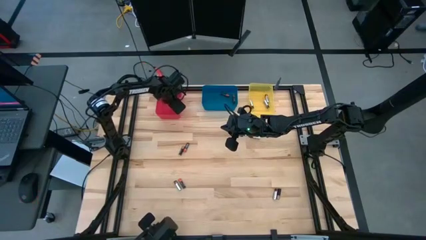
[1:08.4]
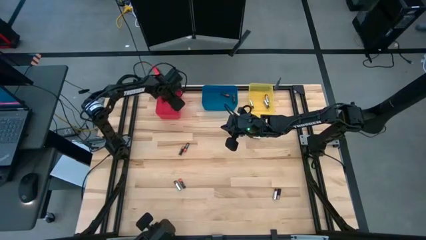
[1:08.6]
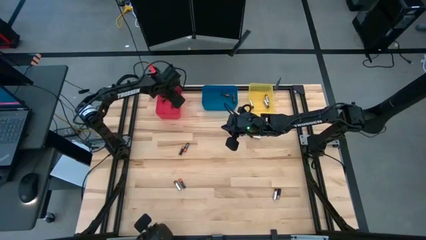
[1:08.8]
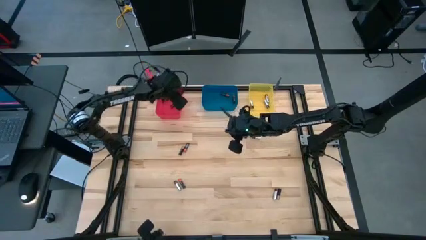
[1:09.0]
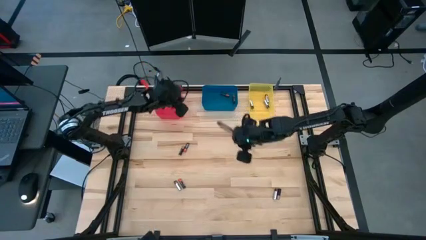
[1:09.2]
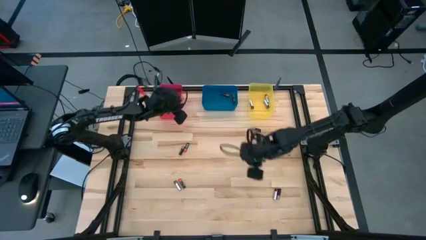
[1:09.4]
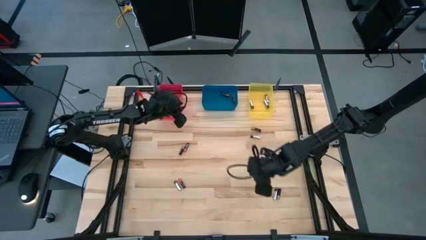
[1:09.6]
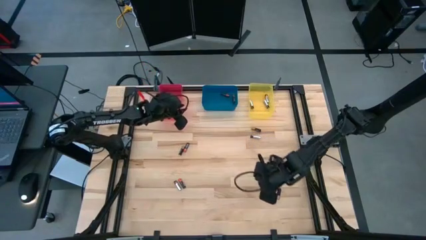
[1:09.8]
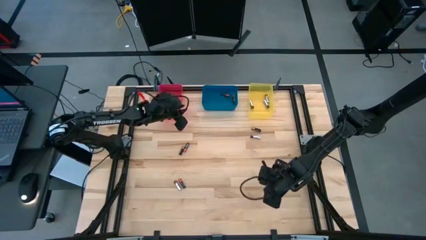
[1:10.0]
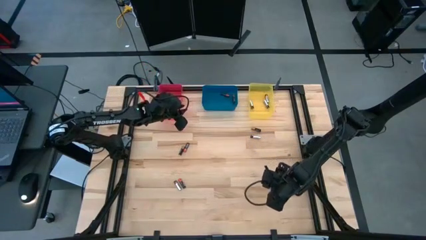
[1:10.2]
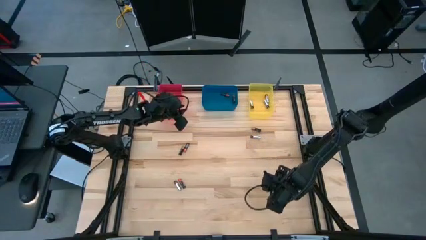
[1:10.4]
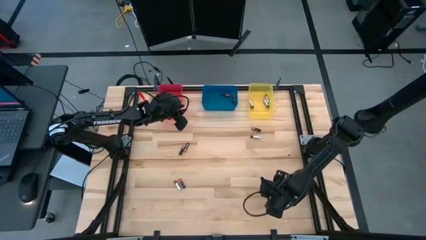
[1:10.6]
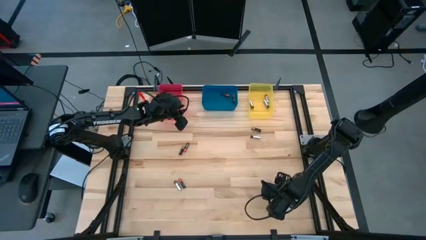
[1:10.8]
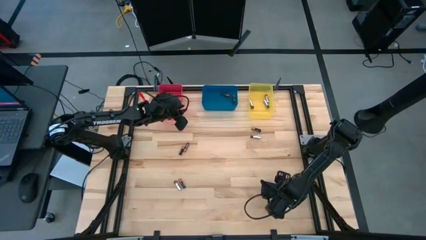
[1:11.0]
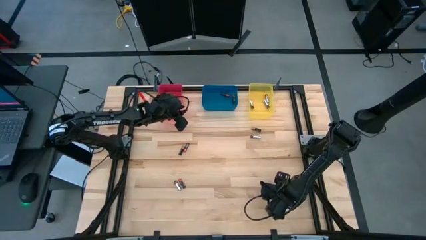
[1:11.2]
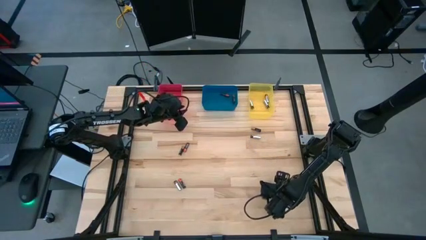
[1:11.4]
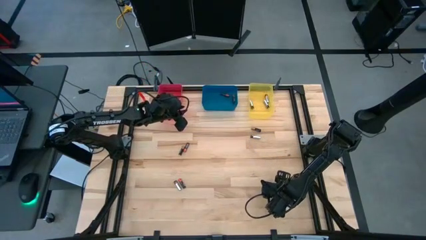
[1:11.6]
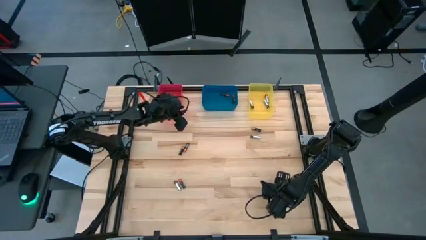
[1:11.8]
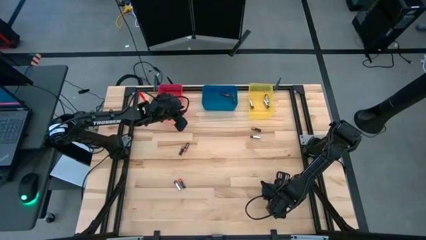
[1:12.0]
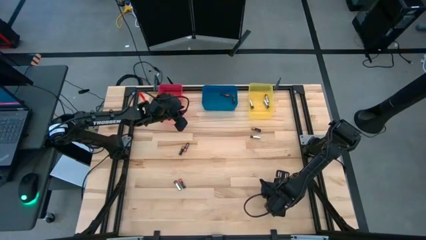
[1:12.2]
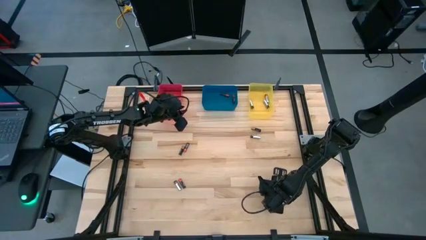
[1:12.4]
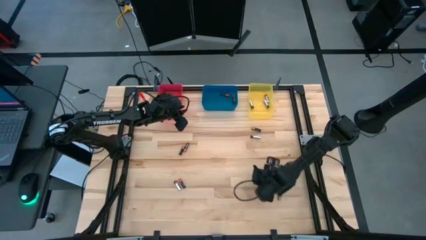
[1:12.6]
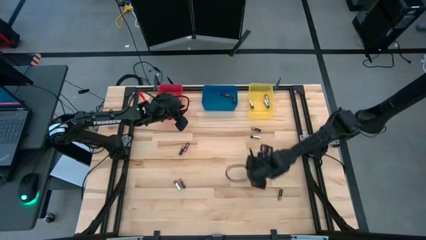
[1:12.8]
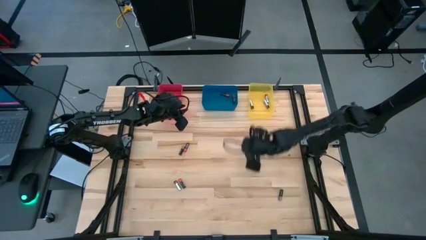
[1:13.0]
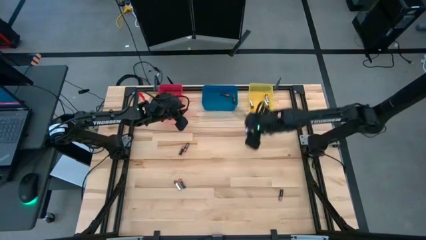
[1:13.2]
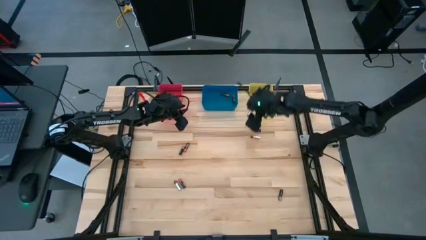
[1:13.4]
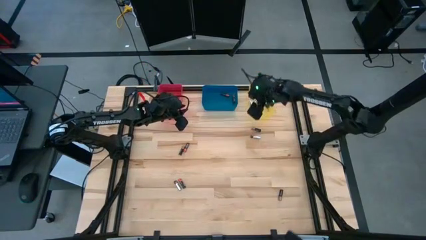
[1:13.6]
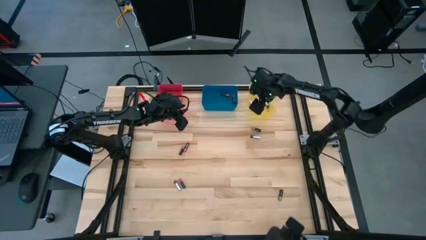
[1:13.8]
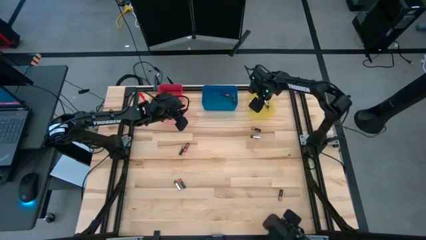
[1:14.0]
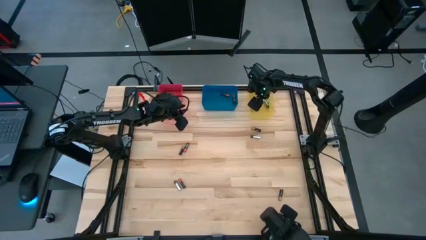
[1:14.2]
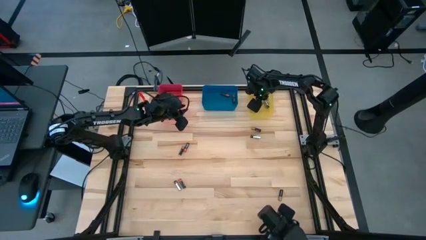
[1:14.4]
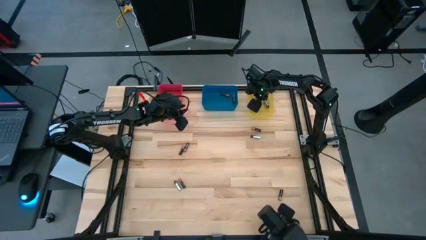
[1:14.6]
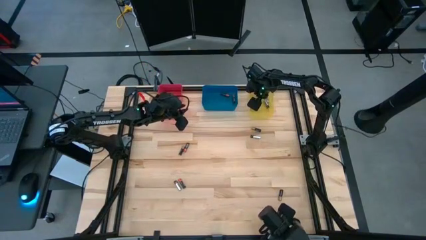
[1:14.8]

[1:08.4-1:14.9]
Task: Sort batteries
Put the silver battery into the yellow bin

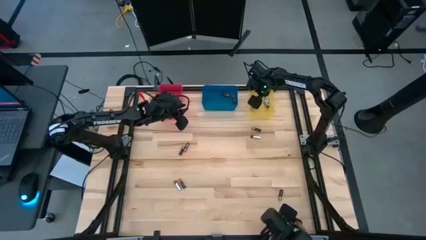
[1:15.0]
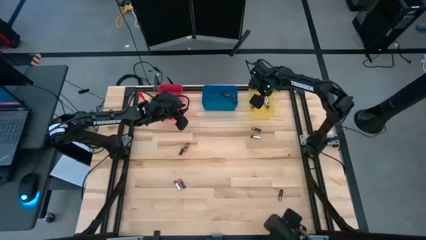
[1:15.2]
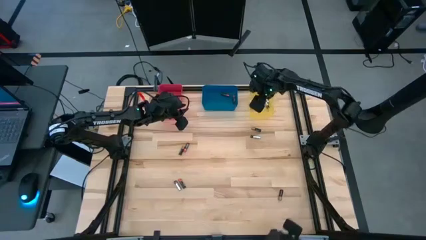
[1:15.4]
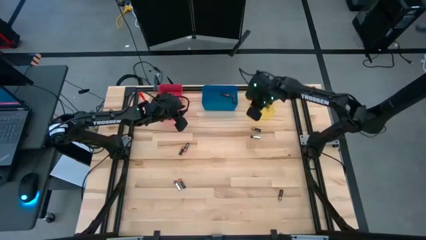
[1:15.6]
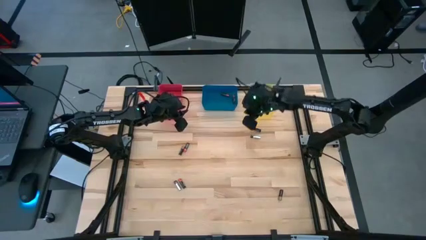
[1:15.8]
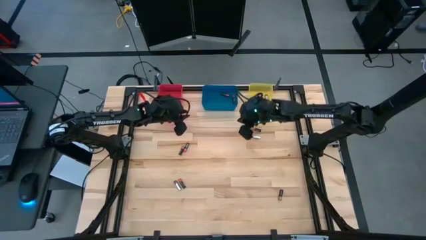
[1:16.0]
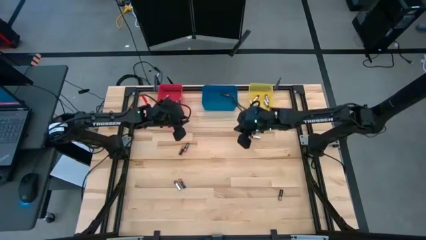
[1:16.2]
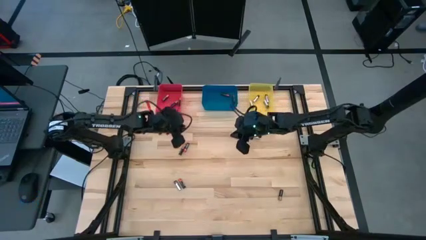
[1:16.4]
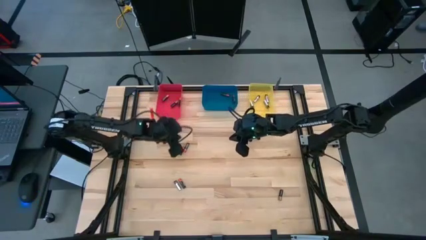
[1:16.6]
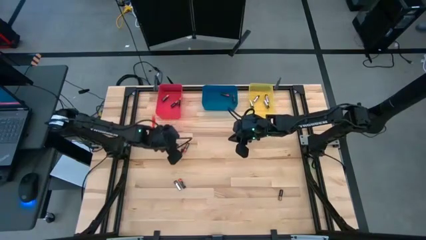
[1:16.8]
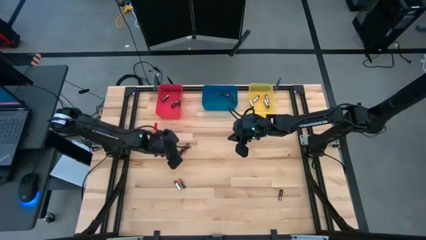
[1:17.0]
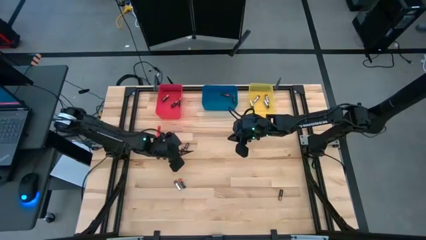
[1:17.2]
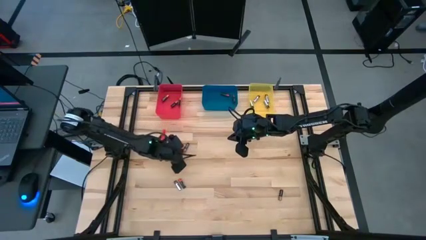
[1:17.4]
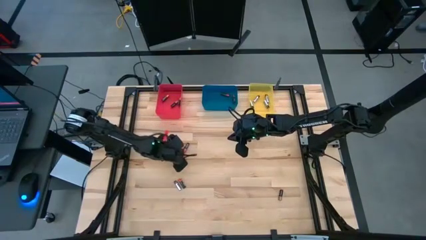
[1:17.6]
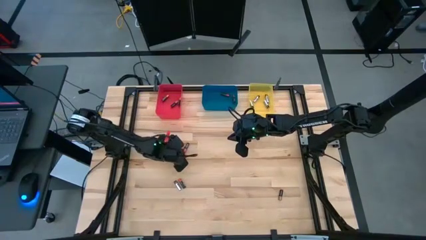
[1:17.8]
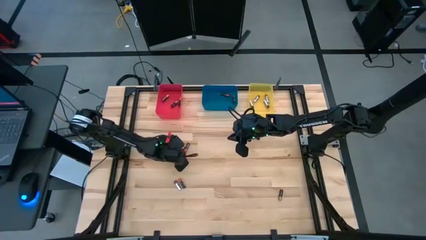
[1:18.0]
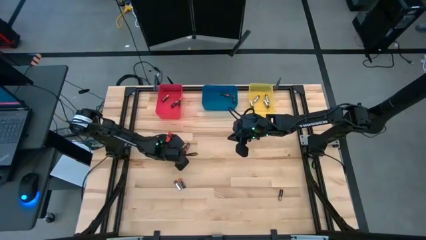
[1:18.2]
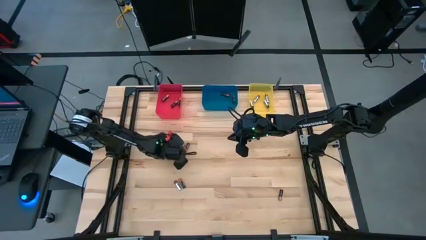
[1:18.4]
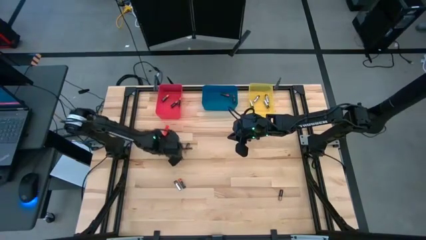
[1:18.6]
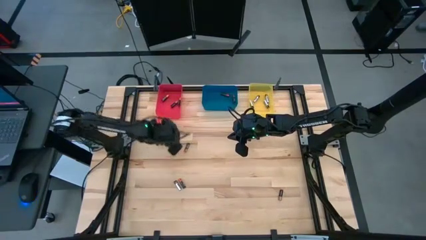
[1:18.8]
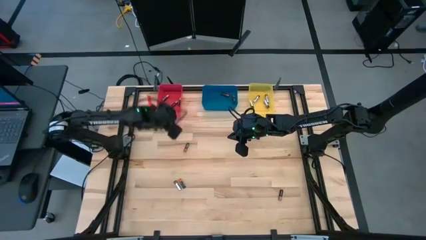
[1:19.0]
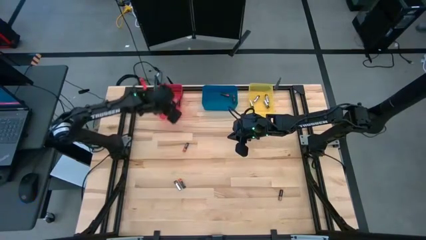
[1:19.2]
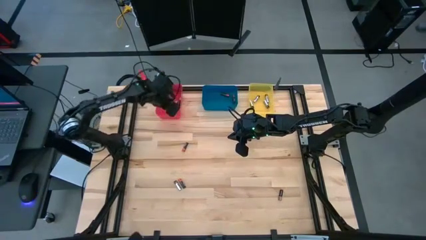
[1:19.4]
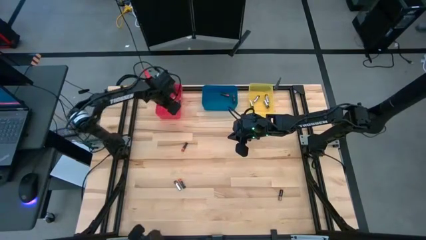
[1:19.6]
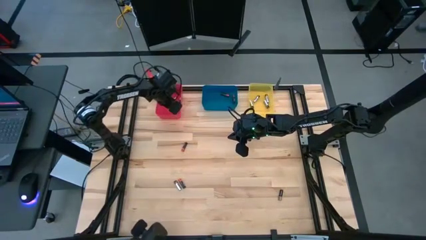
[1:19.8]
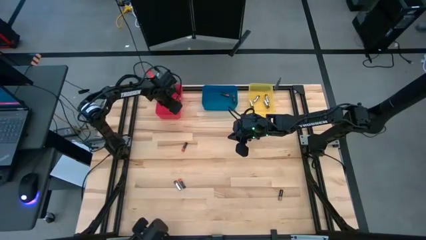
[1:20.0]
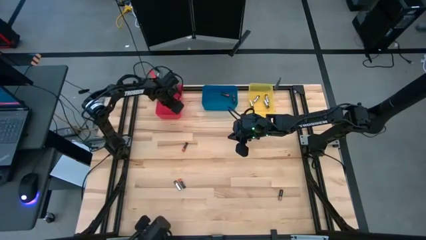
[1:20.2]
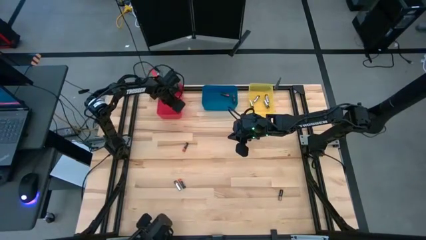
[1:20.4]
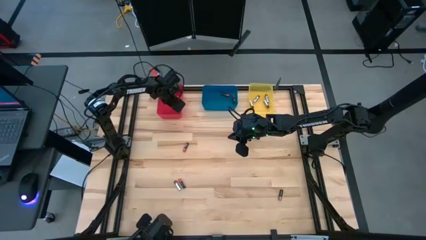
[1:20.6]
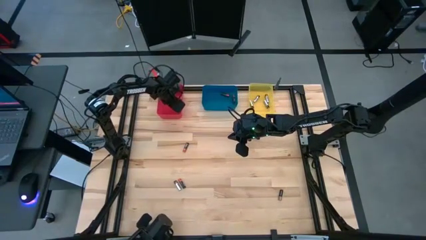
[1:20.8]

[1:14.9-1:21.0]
Put the brown battery into the red bin
